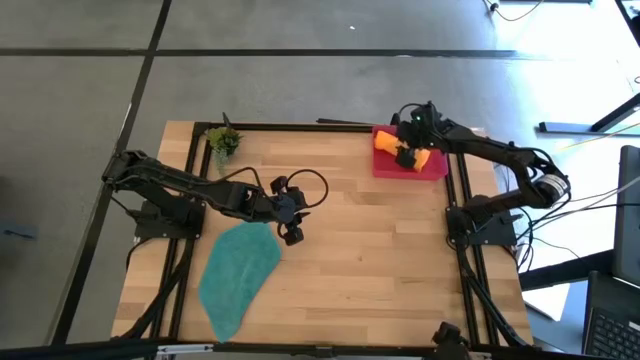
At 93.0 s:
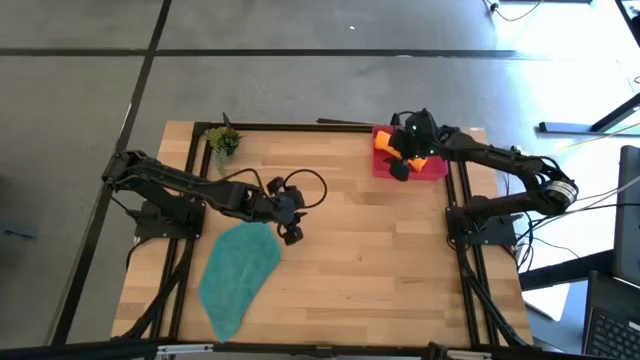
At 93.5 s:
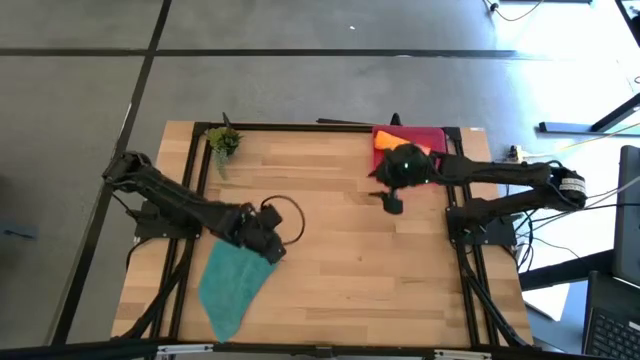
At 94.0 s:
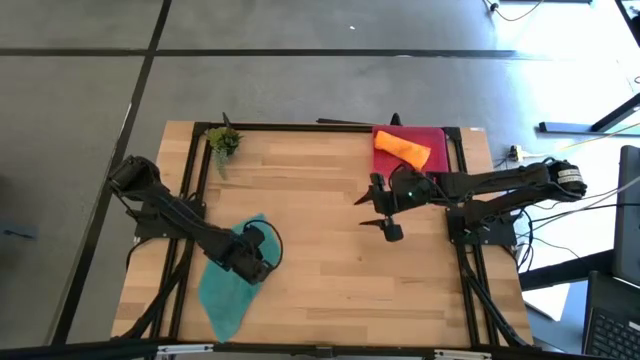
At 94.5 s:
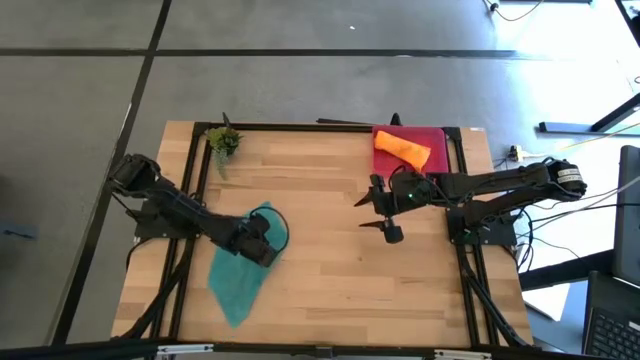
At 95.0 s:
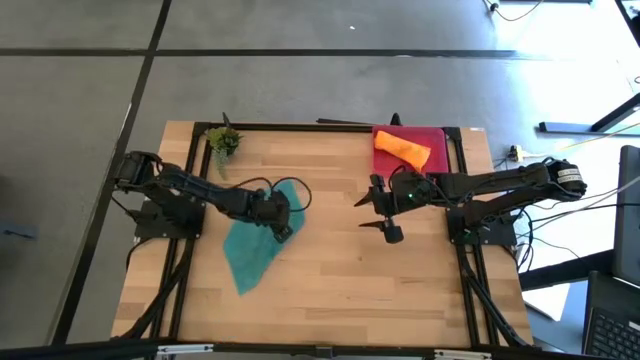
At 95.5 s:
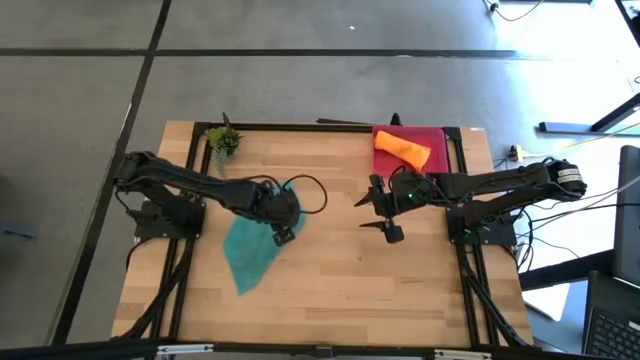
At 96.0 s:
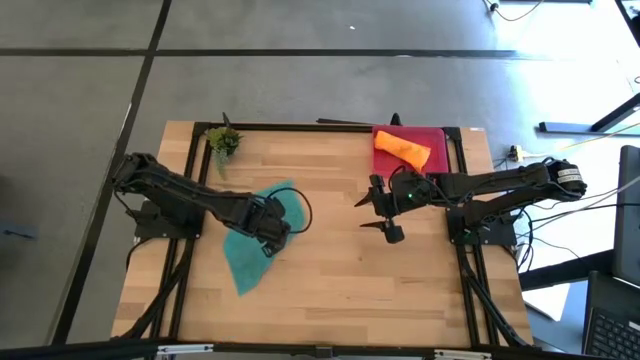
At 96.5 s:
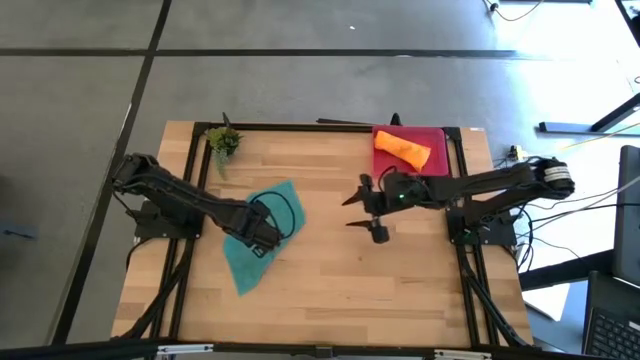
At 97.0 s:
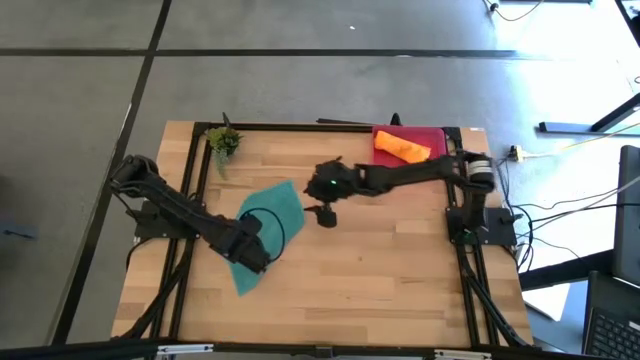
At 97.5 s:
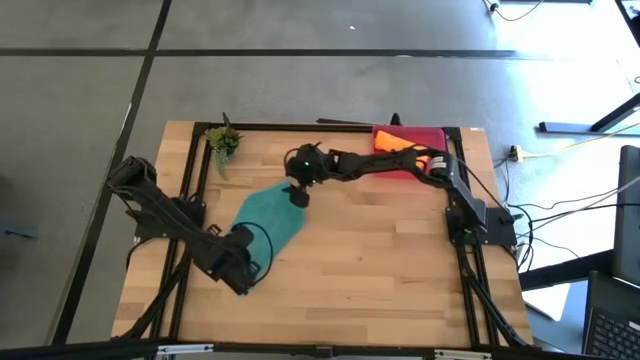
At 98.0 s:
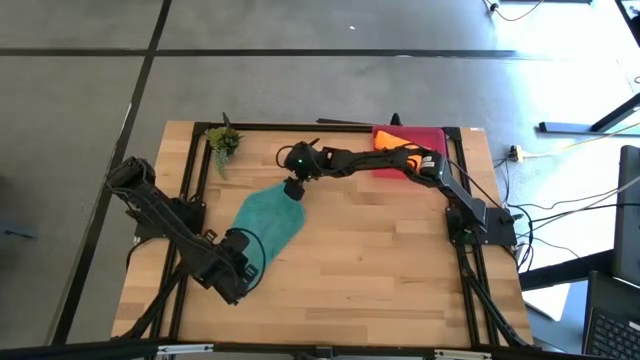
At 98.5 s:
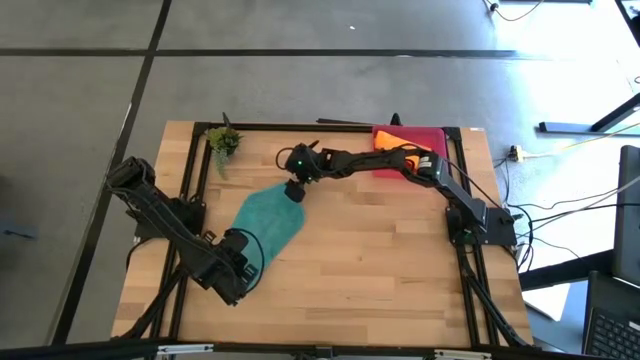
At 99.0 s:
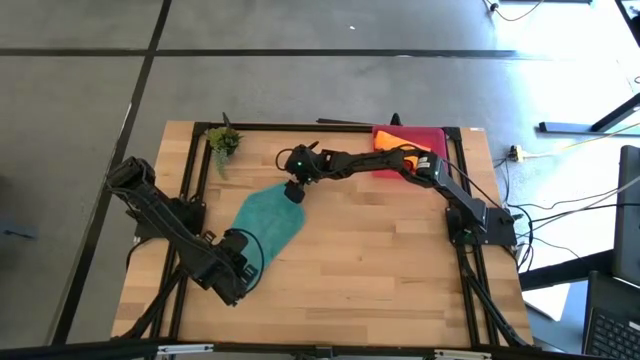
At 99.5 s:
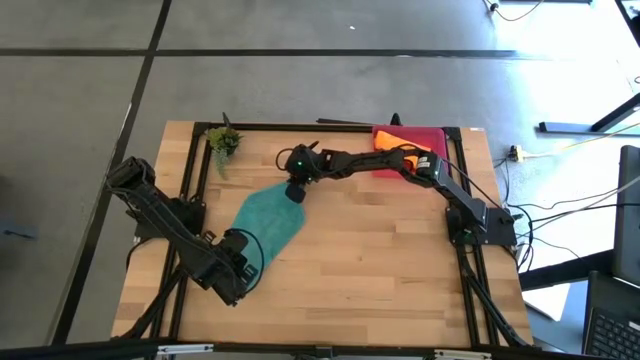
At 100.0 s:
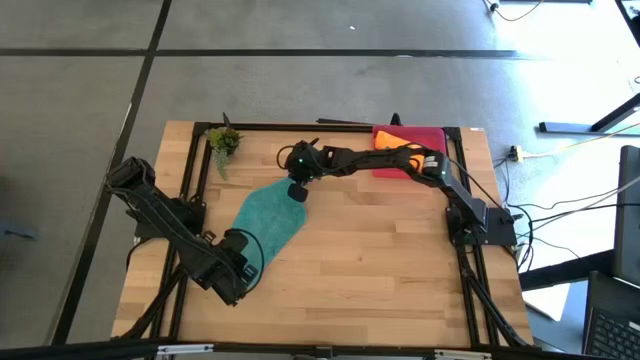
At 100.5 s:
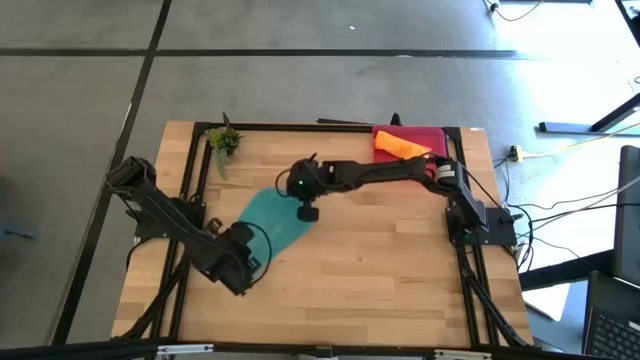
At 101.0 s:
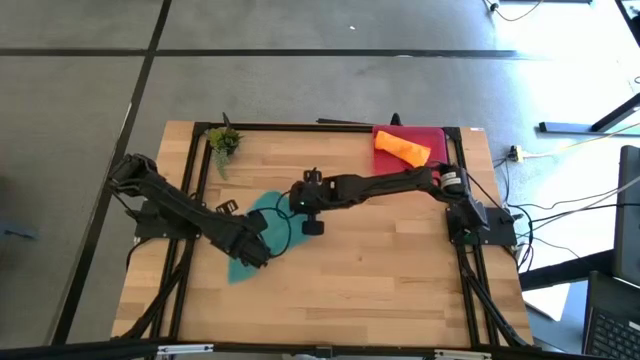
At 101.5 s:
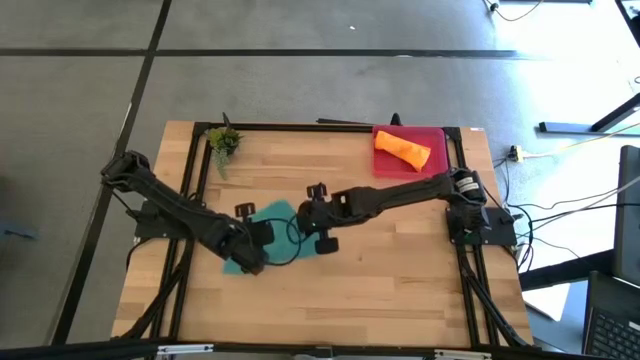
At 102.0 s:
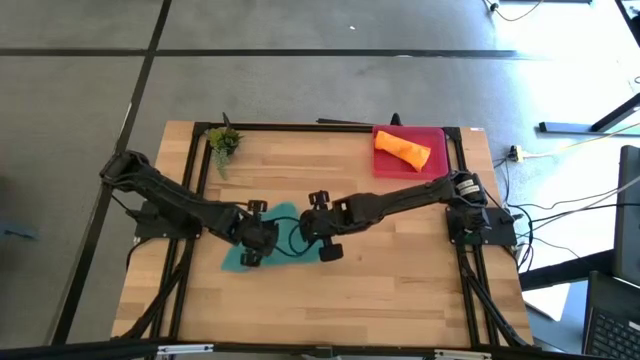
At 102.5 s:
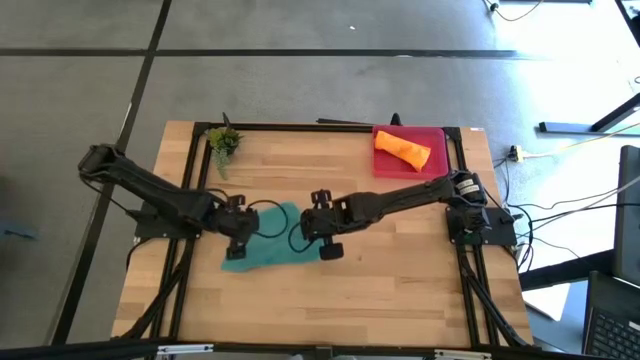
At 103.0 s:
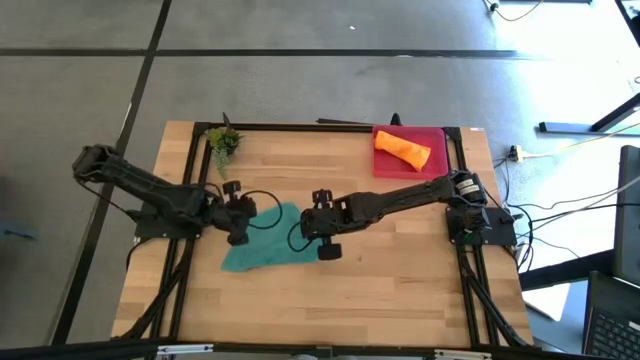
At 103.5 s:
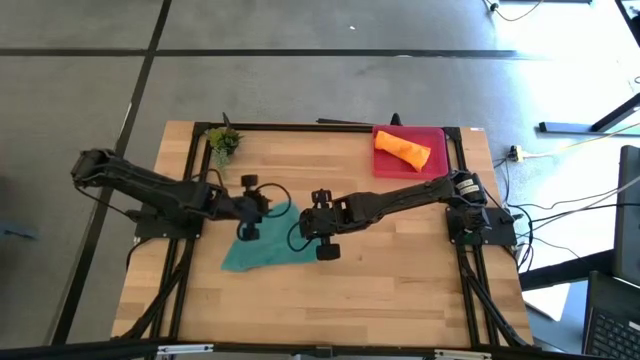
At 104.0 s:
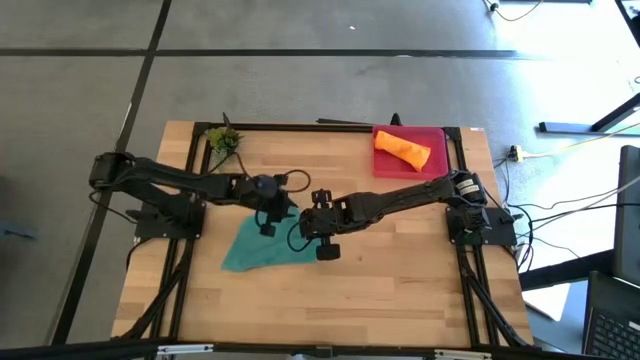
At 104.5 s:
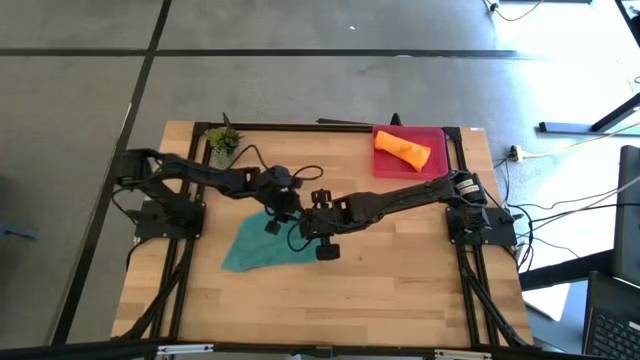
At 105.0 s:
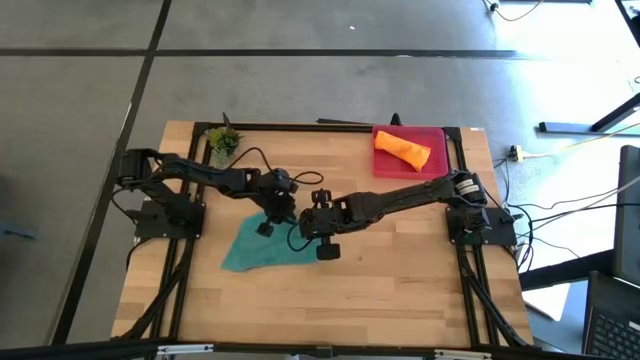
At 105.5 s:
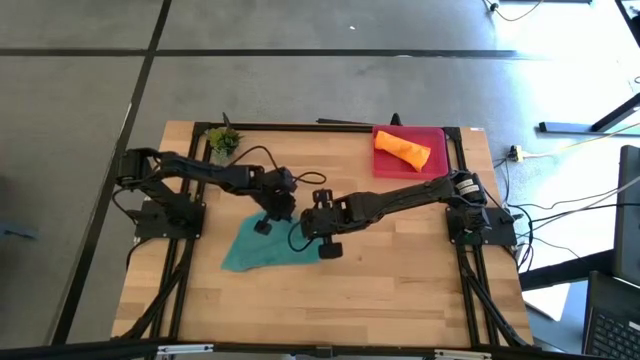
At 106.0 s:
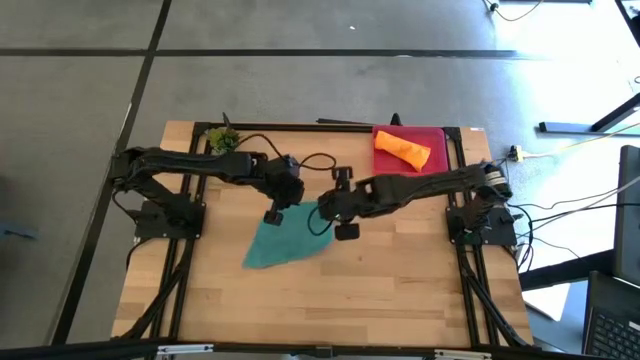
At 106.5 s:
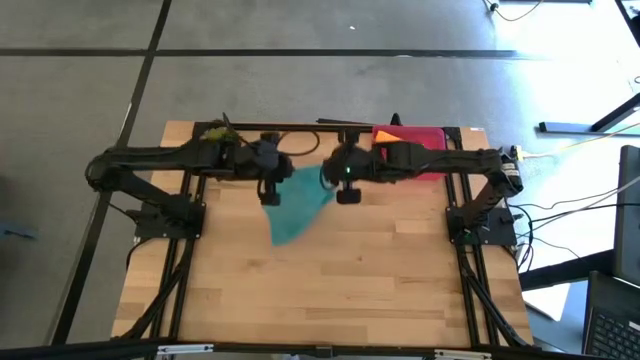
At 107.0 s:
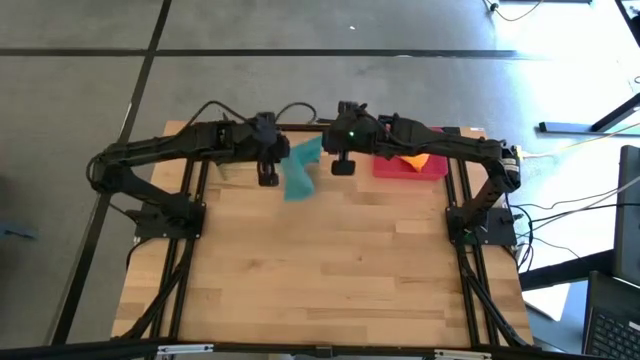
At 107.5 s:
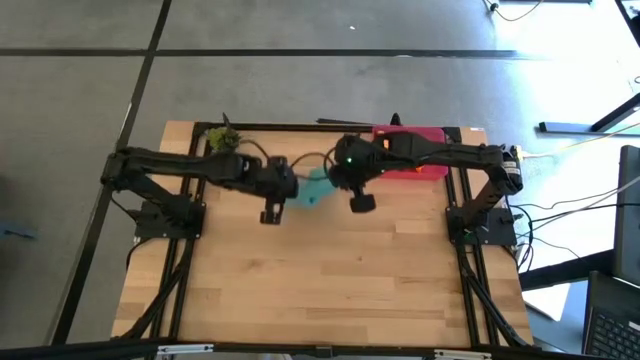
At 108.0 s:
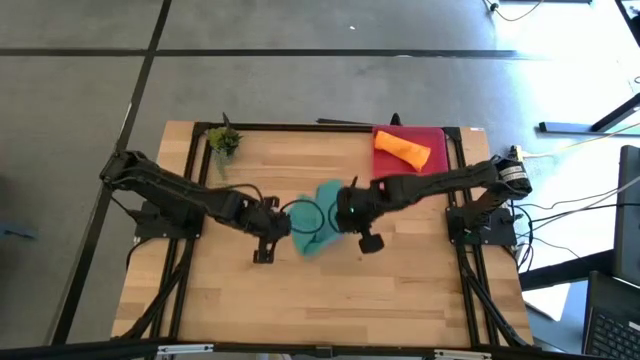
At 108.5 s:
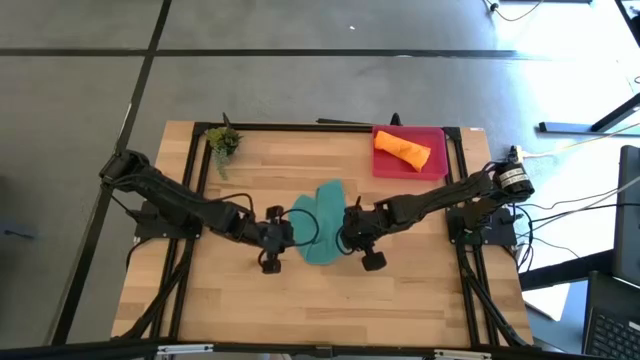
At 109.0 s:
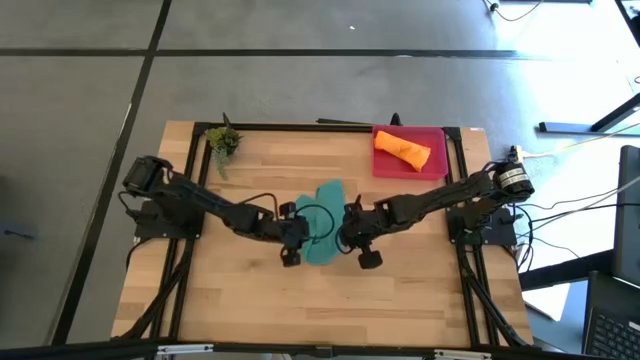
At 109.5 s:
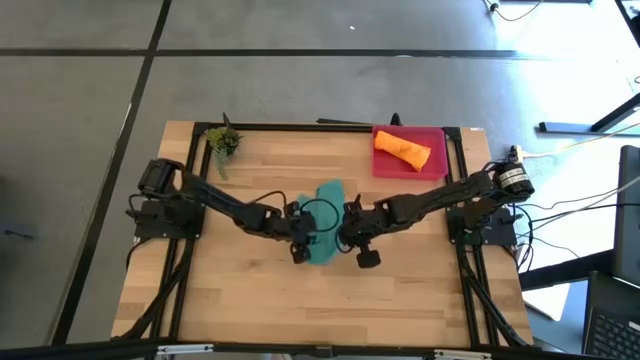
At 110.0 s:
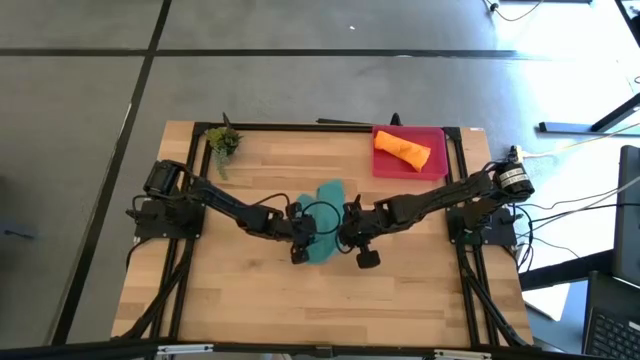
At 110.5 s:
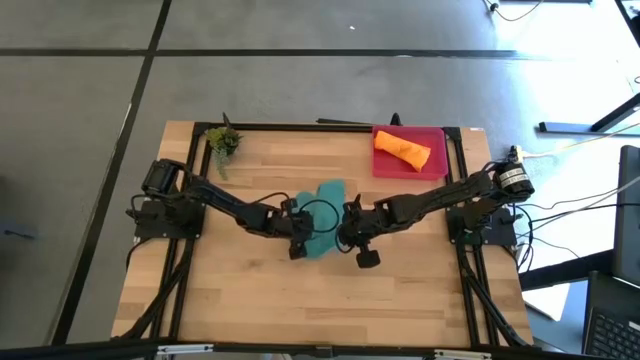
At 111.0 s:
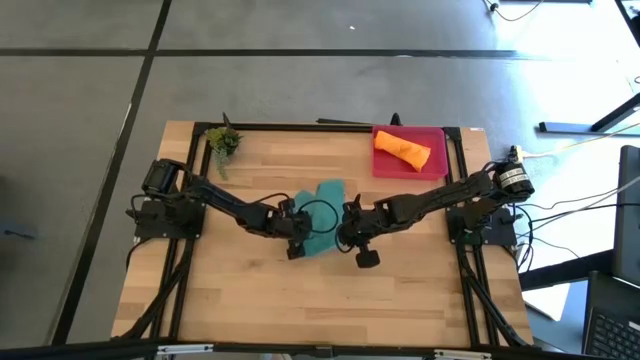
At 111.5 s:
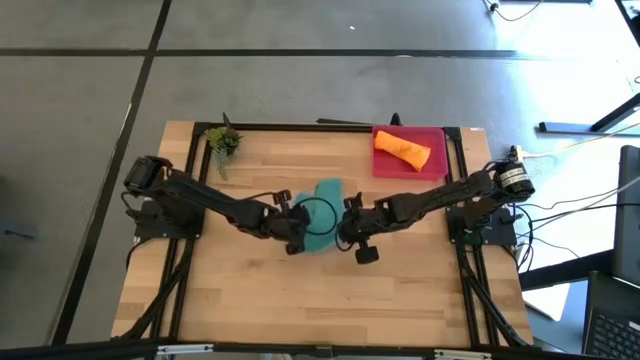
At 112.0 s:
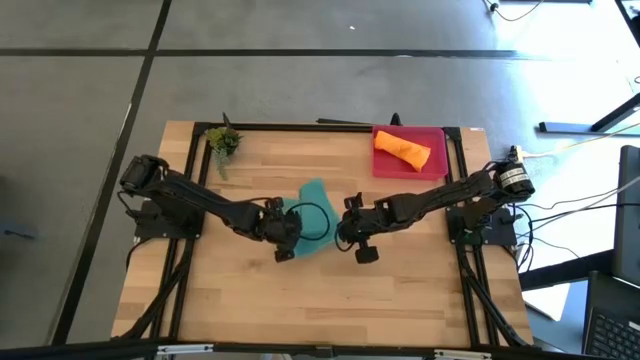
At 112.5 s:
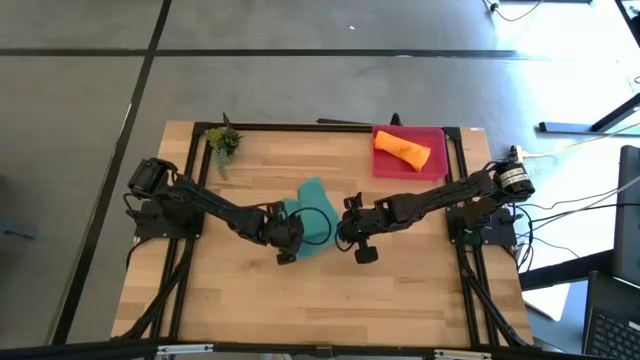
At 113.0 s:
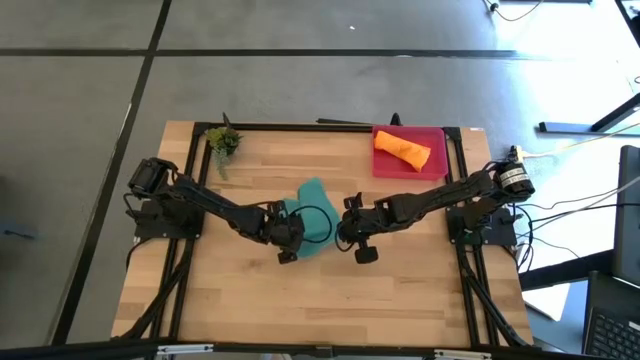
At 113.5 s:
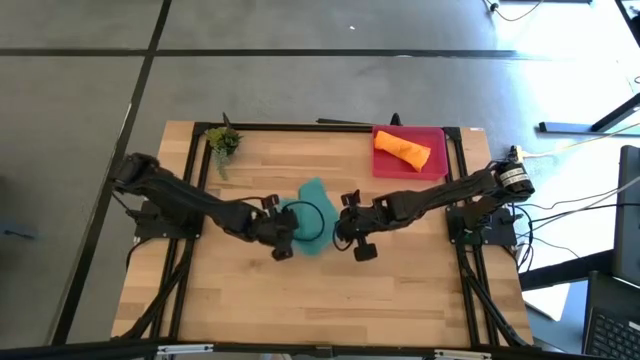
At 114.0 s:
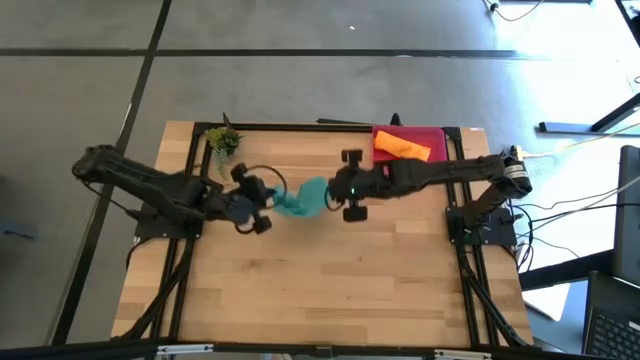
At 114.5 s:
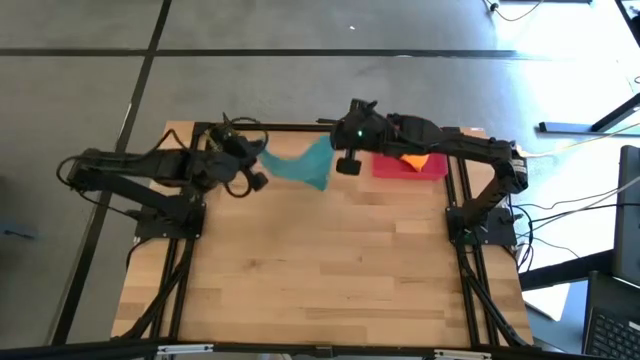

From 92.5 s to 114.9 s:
Task: Roll microfiber towels into tight, uniform cylinder then place into a basket
Fold the blue microfiber towel
